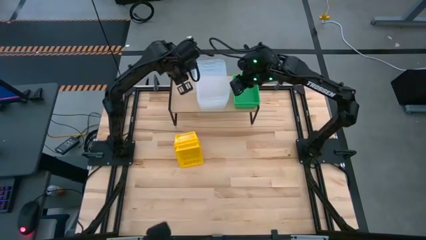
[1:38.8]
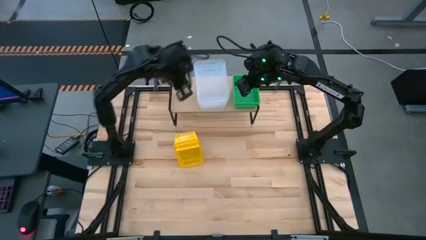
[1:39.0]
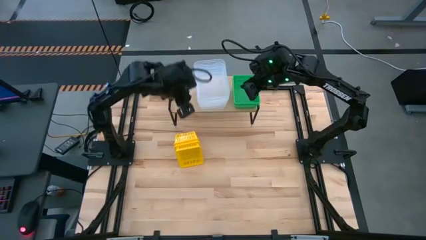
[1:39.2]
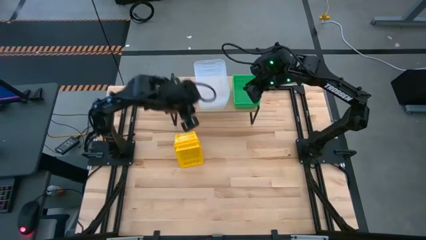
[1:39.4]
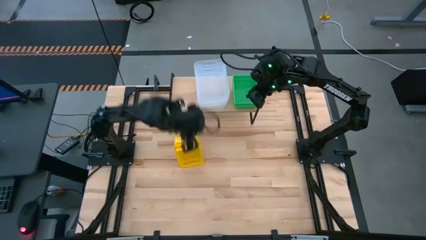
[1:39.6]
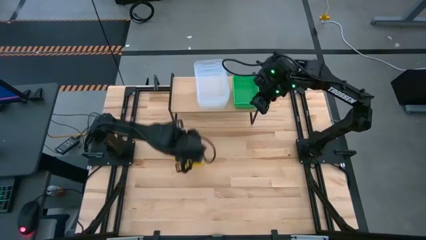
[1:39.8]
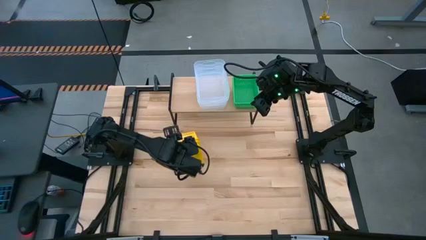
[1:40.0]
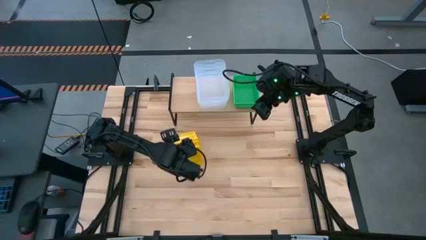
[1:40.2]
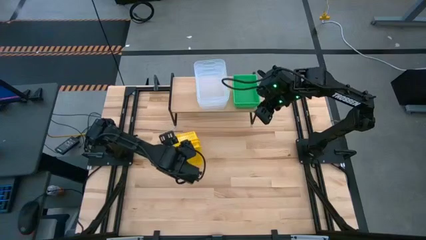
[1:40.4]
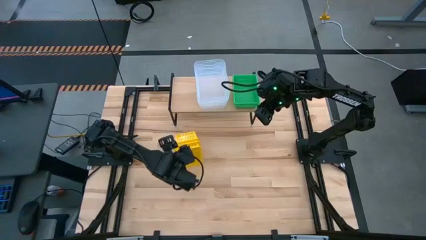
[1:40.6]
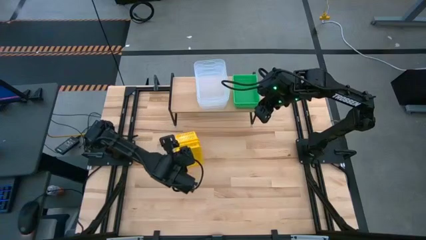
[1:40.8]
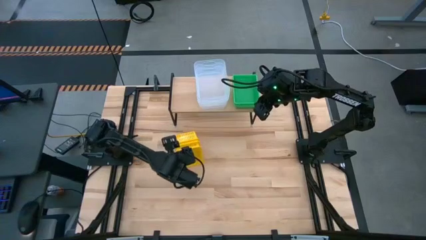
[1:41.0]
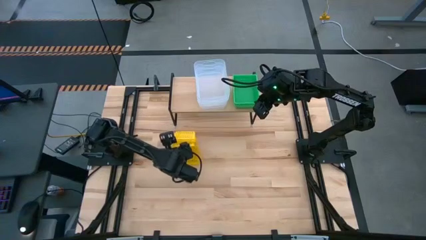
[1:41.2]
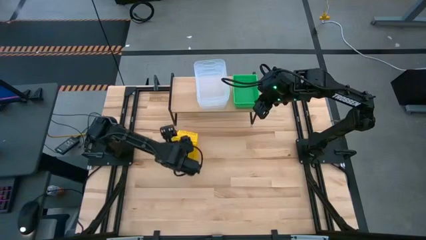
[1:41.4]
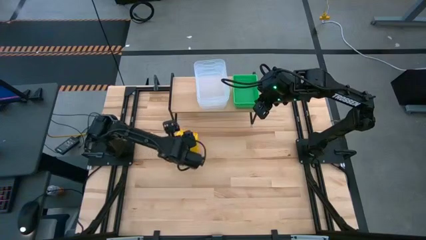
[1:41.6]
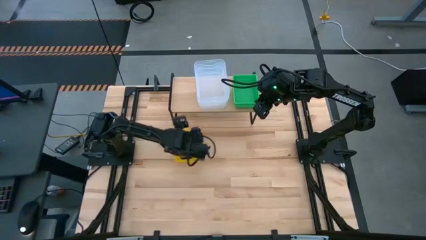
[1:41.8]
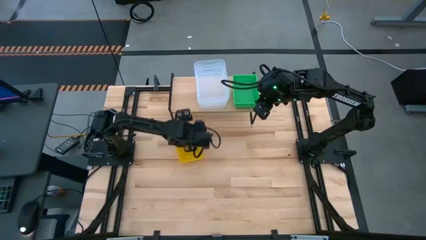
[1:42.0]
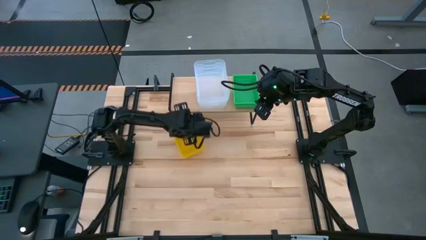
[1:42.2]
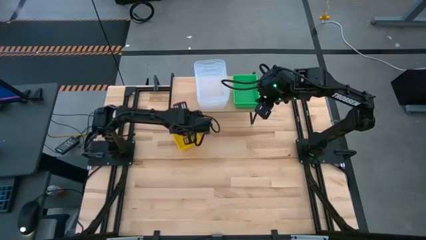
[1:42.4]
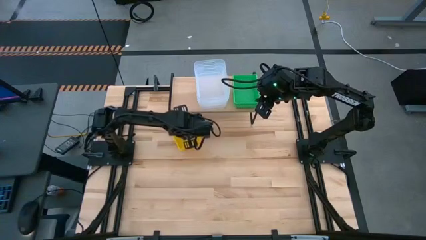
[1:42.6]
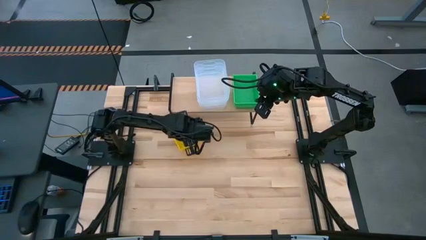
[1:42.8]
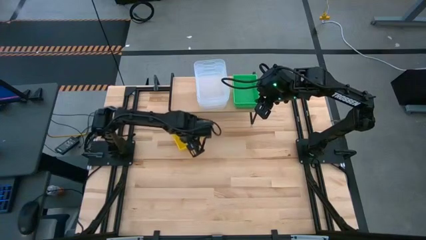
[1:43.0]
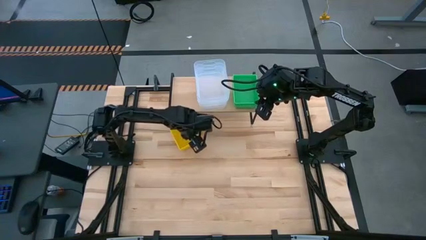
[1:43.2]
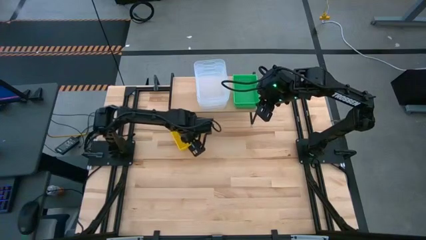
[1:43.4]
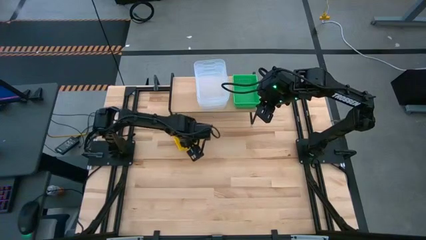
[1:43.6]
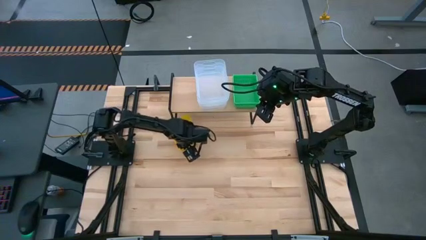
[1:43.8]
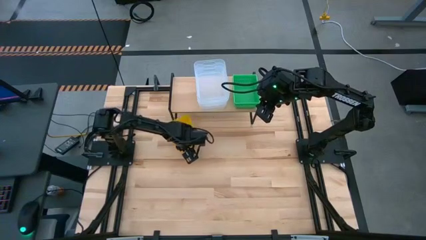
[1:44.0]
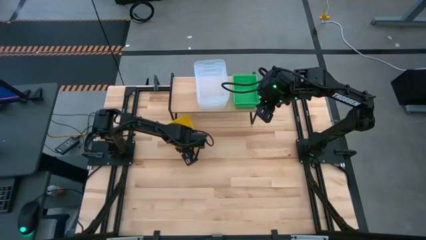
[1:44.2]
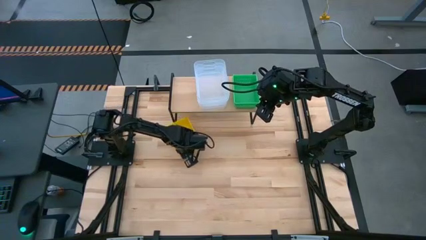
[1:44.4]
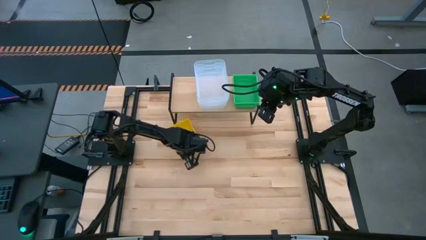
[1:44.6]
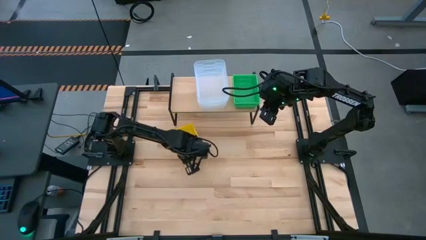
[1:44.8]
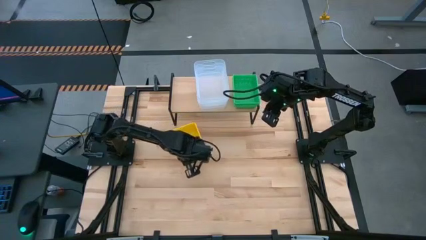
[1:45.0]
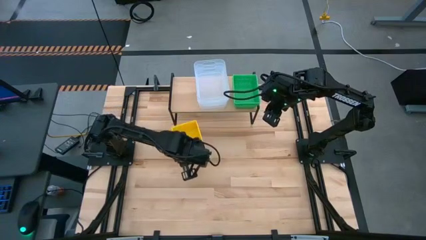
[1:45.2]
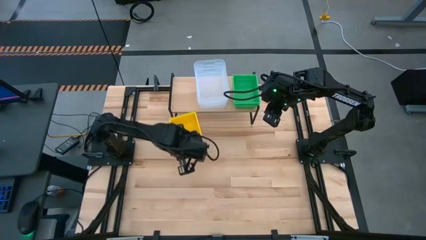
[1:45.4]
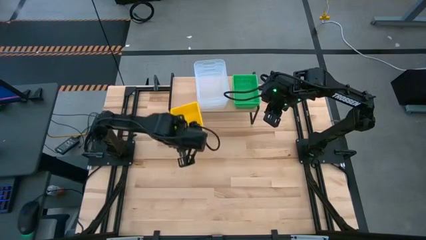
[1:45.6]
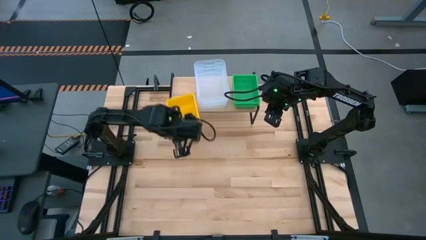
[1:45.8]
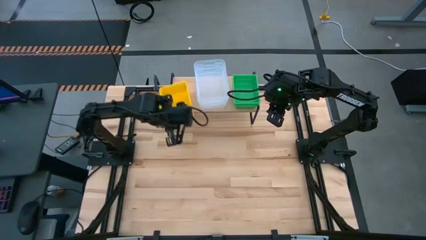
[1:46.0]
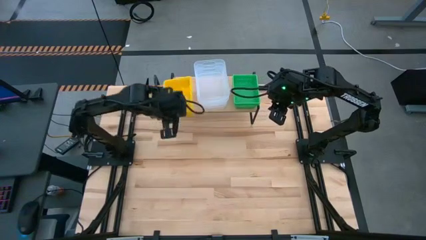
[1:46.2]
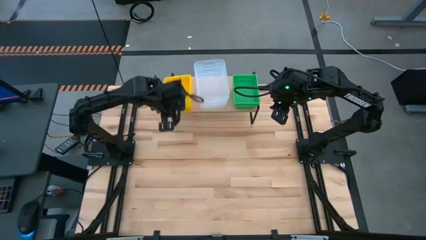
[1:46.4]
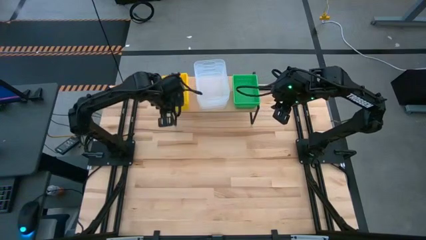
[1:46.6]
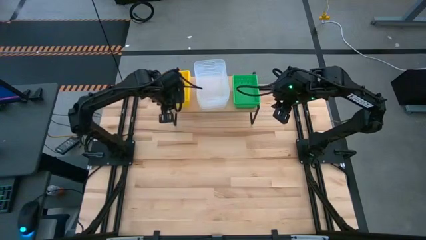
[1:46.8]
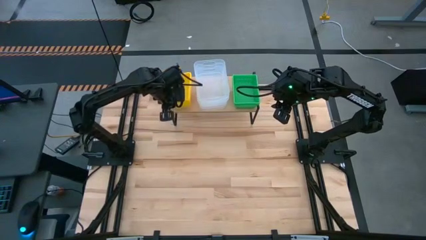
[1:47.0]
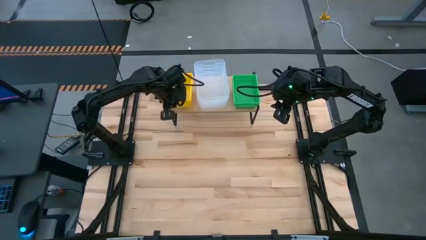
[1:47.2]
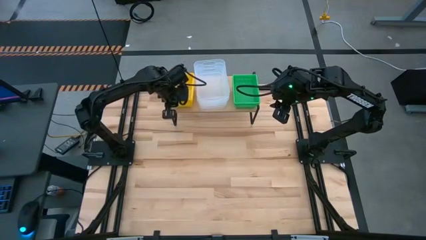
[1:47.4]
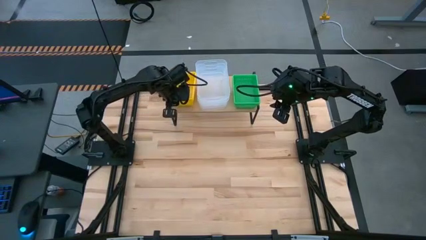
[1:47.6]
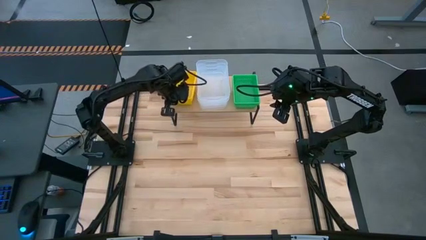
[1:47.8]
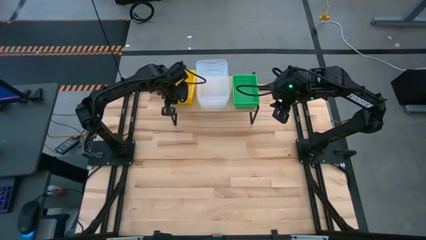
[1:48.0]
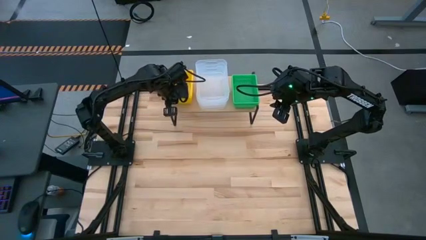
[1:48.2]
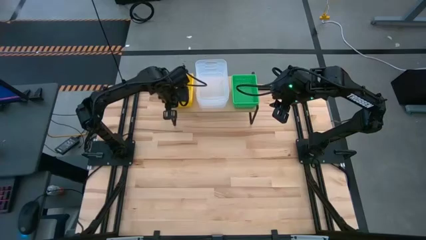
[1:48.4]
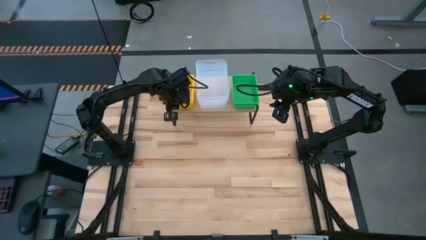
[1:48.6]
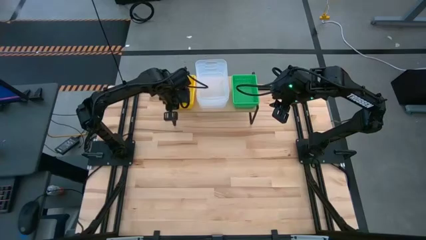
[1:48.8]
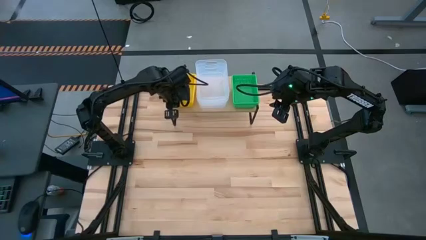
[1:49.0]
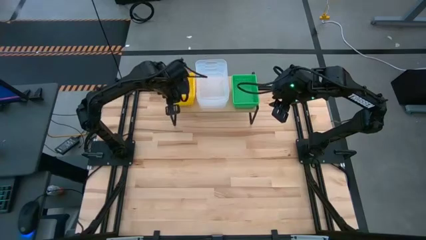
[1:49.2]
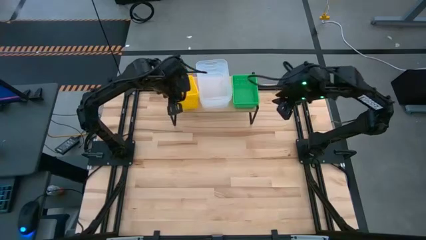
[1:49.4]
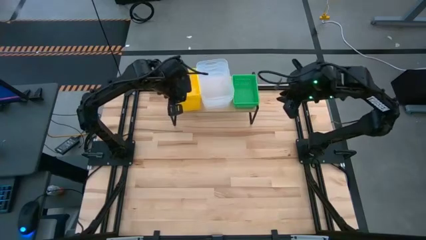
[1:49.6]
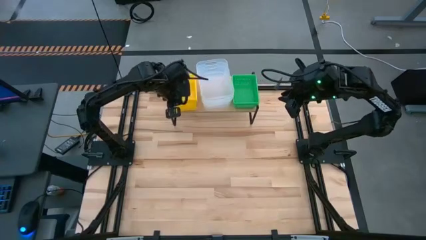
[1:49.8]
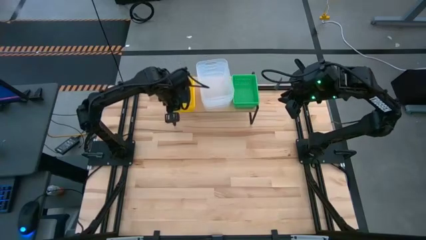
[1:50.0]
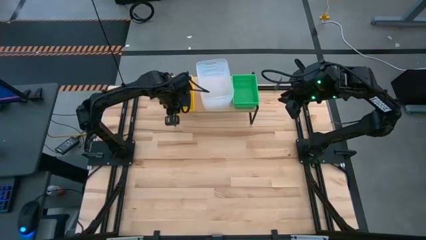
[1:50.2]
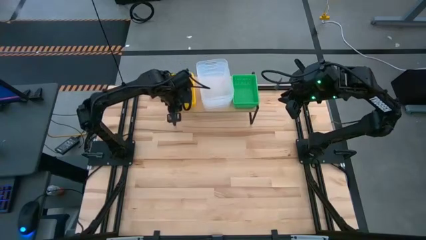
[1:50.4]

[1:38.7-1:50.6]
Task: Stack baskets on shelf by color
Put the stacked yellow bins on the shelf

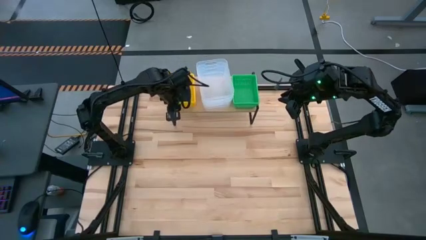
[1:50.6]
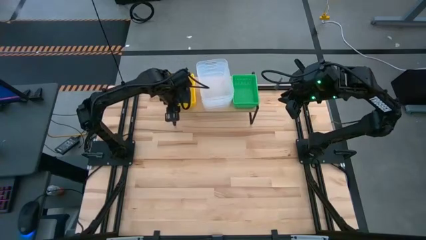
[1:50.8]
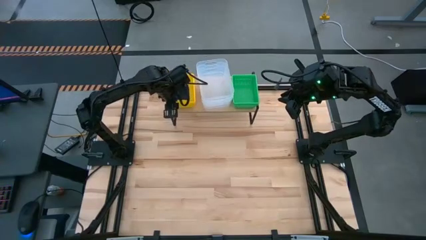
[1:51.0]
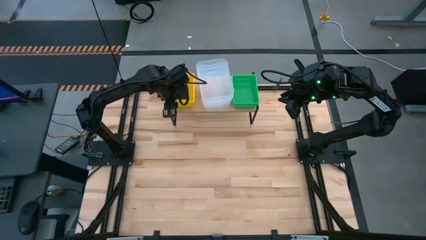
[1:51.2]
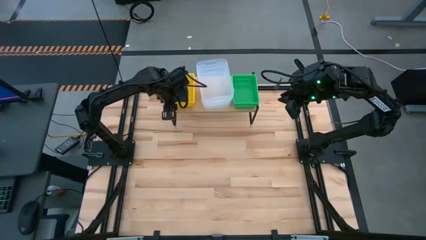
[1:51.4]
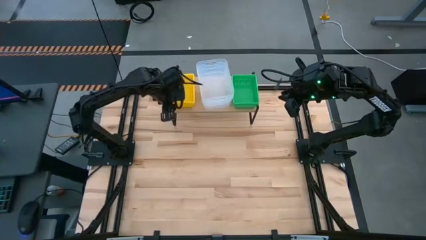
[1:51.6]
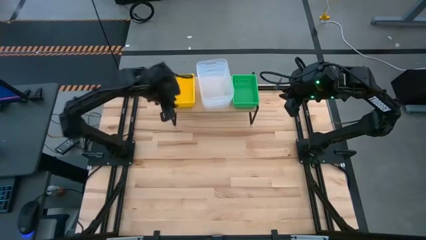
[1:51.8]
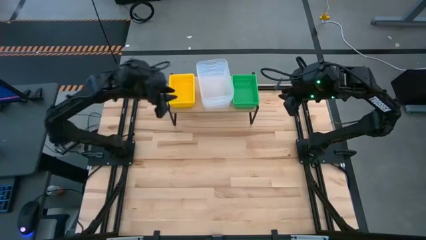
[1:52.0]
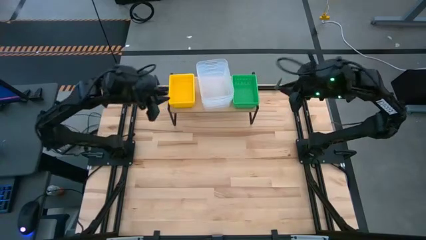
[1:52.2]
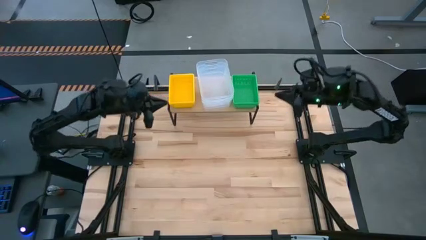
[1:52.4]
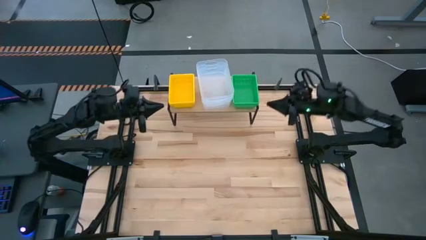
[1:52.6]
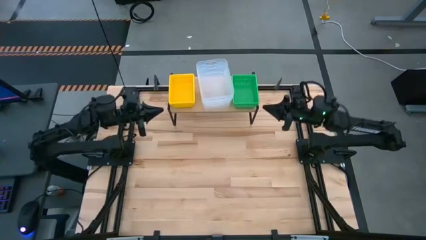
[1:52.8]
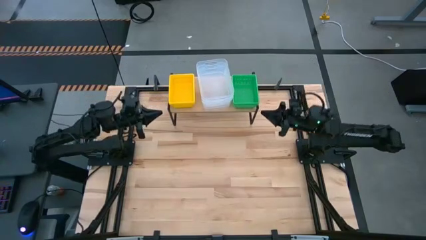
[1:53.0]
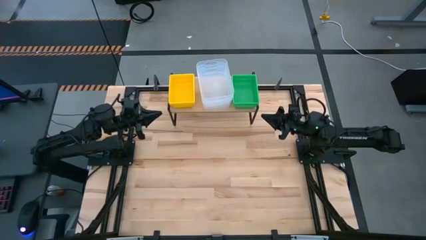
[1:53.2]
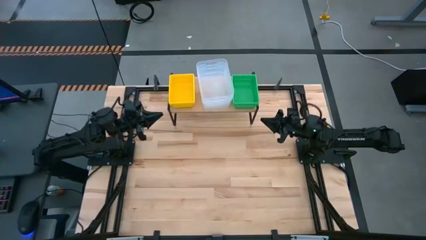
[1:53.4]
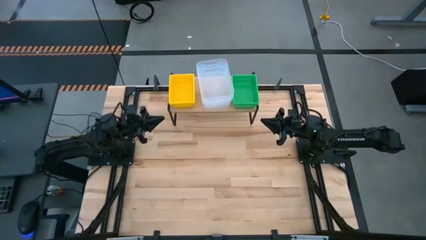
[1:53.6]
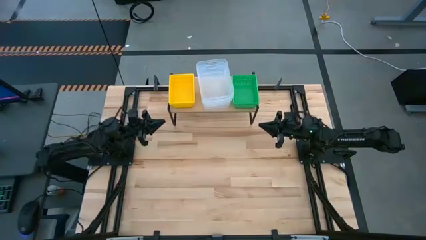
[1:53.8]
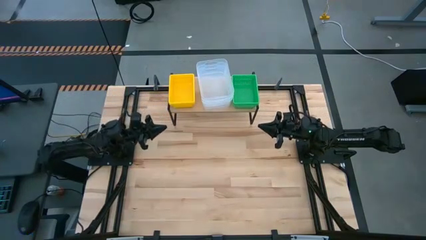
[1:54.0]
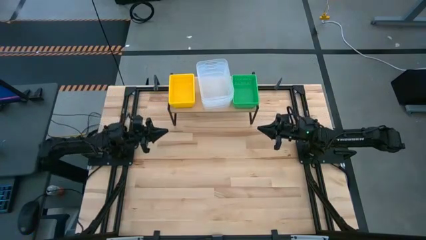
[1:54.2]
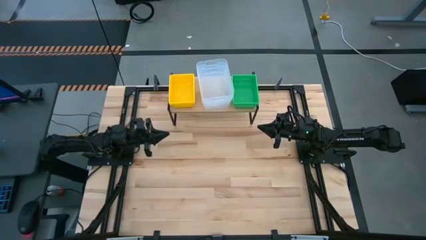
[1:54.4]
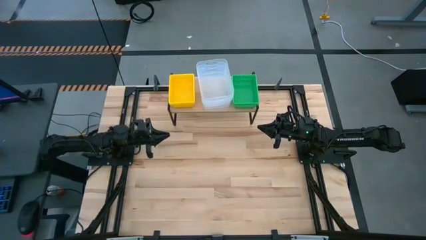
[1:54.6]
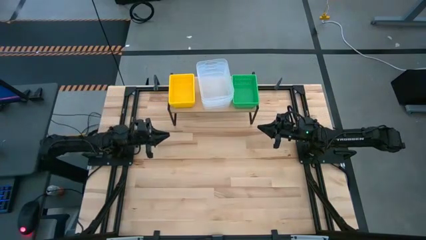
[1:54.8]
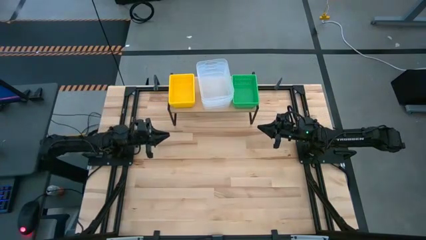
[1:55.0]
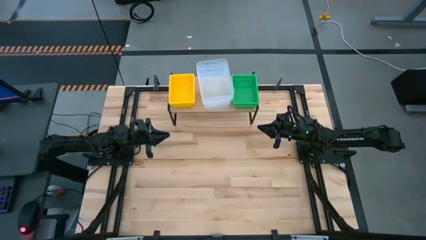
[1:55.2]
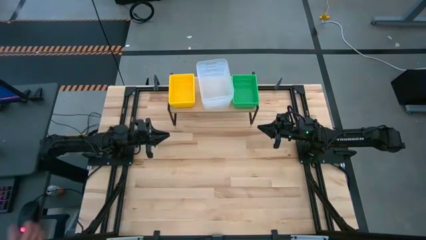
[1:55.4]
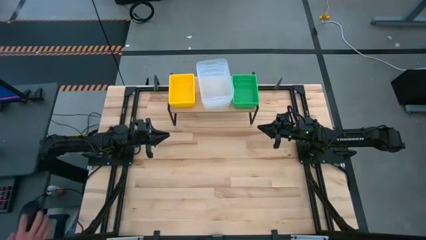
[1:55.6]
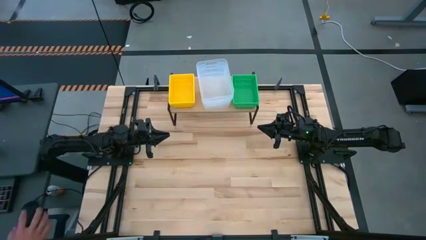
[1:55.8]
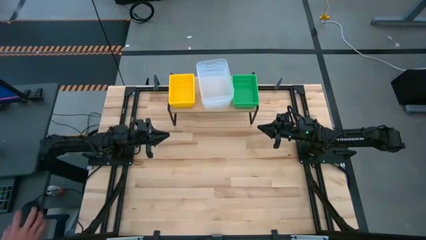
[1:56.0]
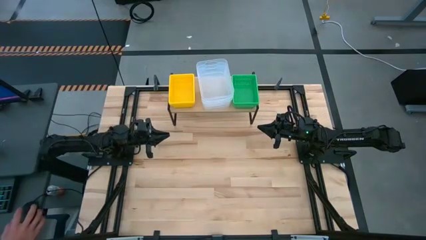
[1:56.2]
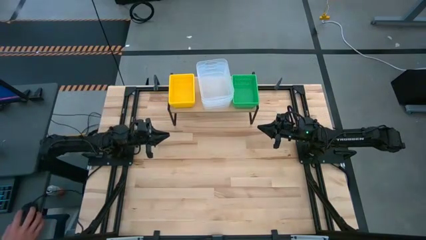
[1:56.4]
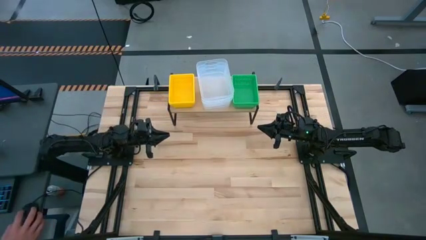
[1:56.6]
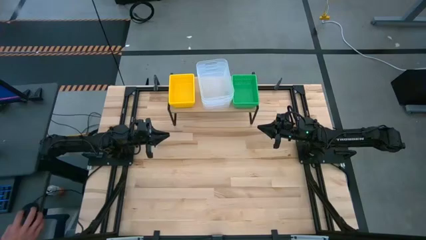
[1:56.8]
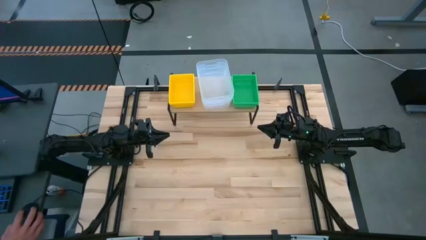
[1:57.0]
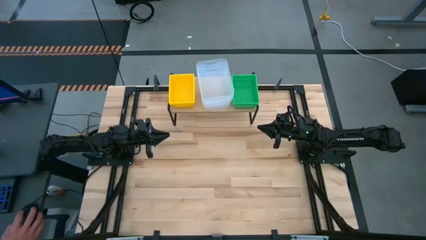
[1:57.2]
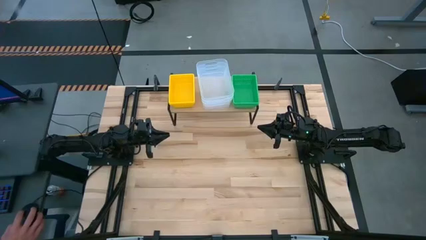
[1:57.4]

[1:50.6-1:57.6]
Return to Home Position
